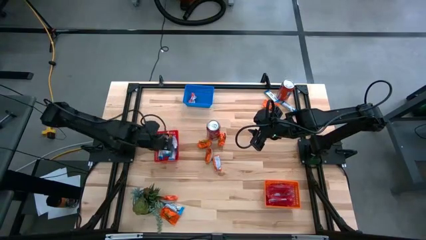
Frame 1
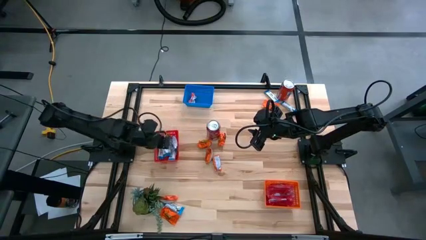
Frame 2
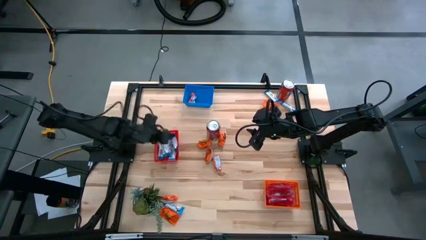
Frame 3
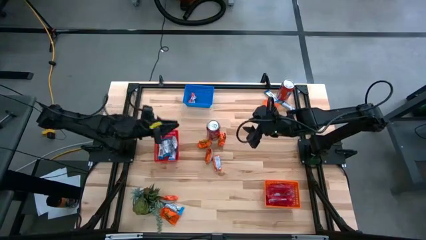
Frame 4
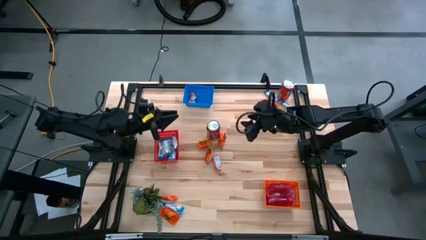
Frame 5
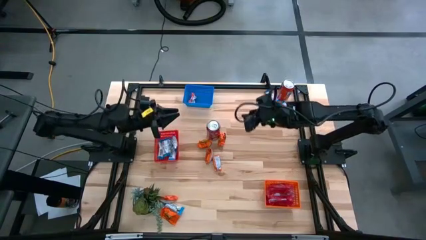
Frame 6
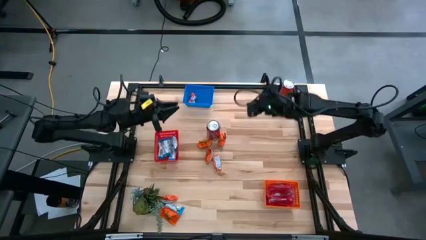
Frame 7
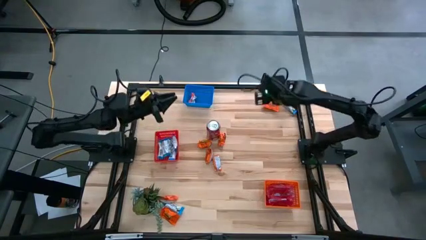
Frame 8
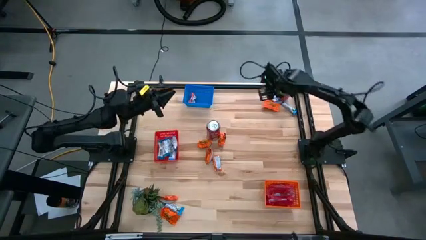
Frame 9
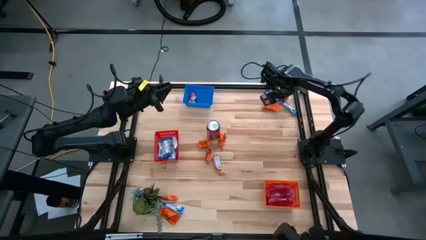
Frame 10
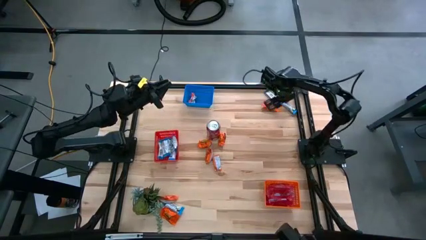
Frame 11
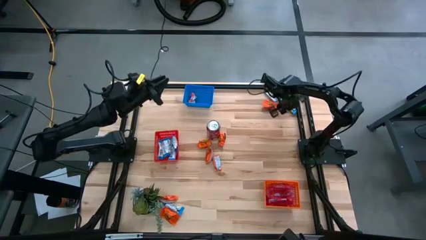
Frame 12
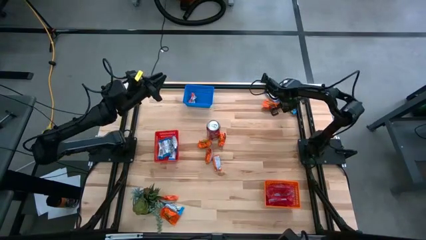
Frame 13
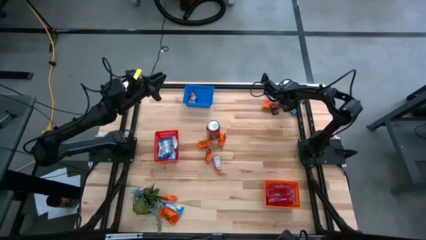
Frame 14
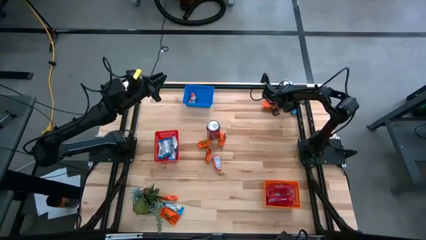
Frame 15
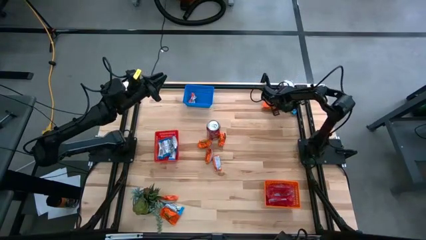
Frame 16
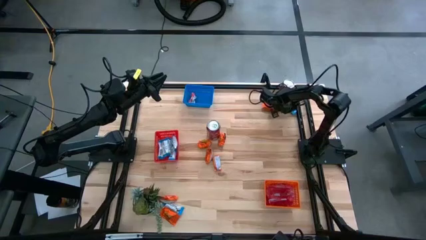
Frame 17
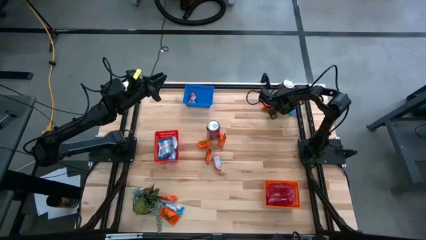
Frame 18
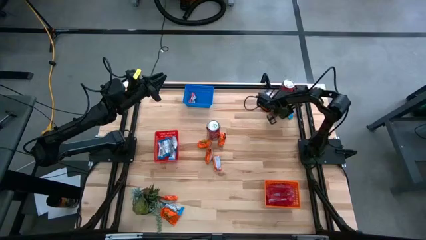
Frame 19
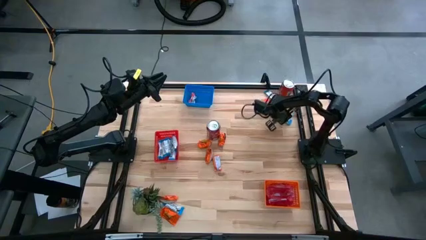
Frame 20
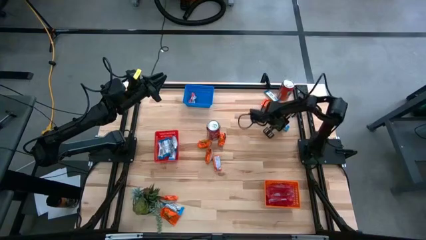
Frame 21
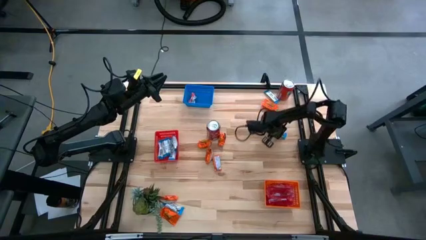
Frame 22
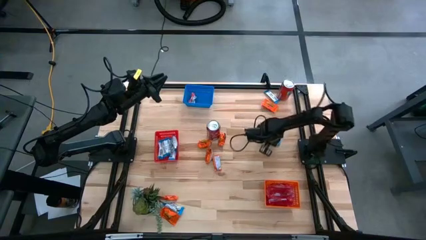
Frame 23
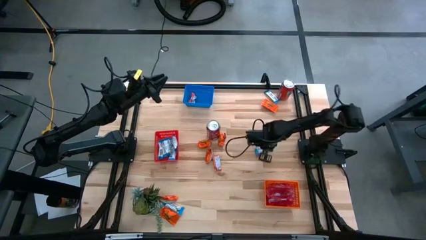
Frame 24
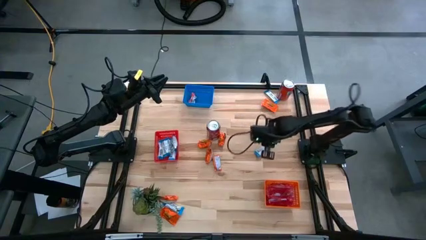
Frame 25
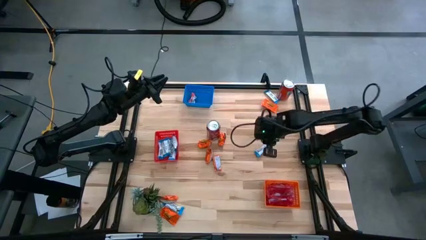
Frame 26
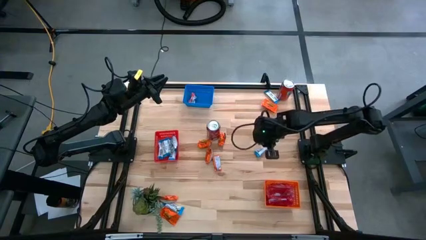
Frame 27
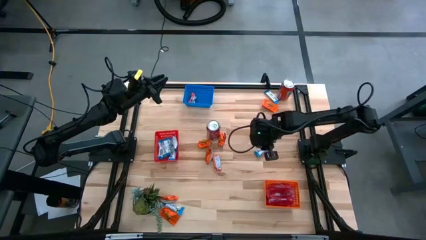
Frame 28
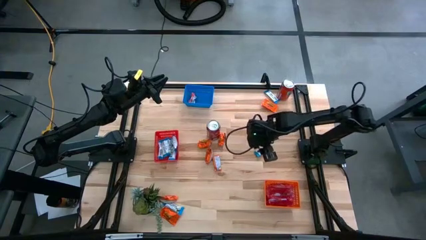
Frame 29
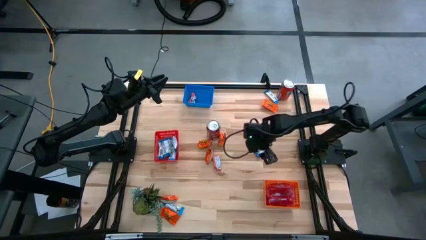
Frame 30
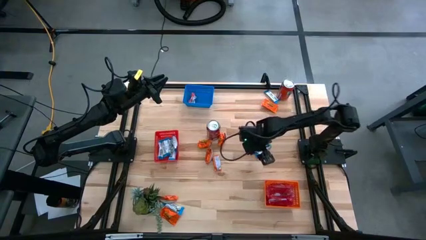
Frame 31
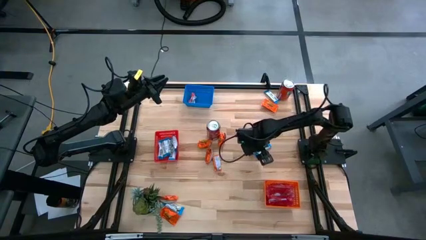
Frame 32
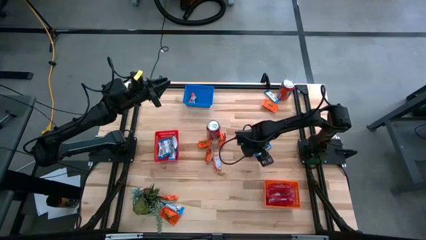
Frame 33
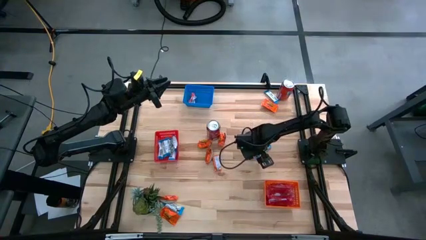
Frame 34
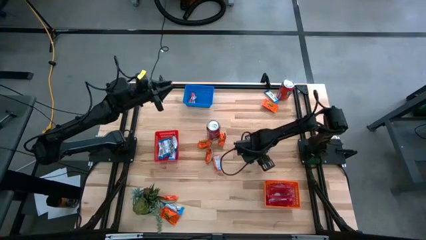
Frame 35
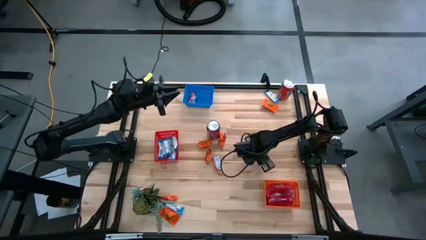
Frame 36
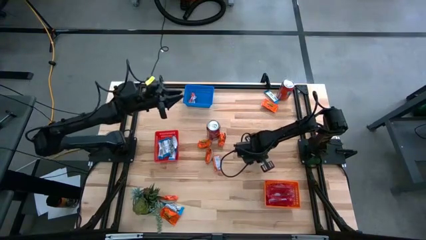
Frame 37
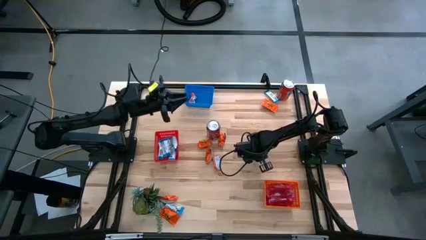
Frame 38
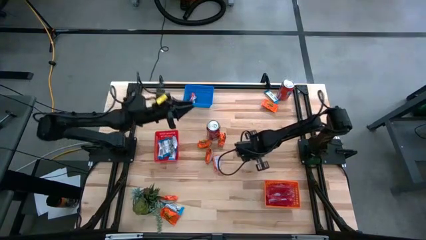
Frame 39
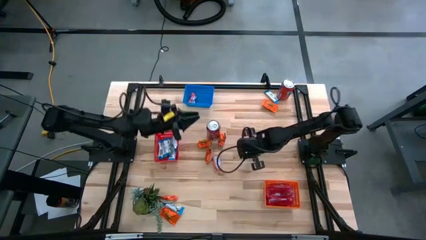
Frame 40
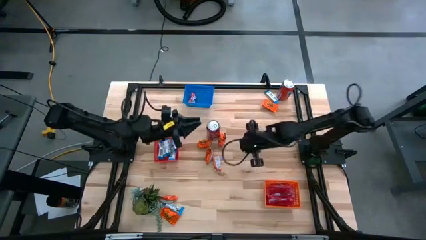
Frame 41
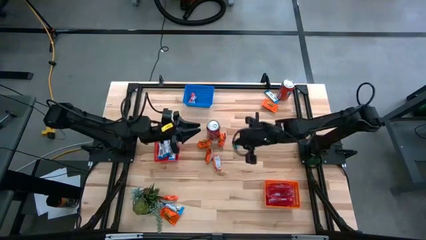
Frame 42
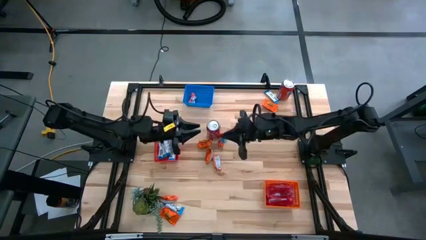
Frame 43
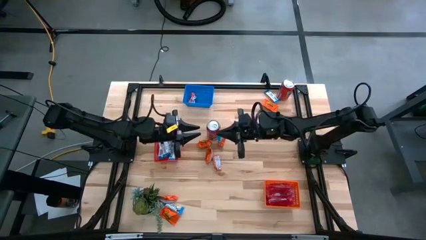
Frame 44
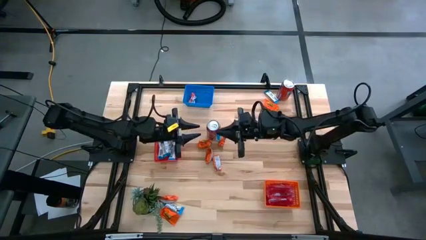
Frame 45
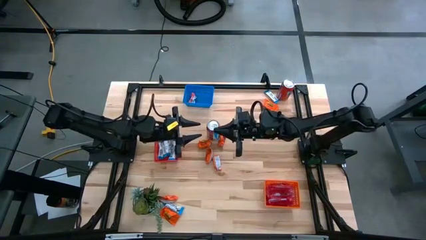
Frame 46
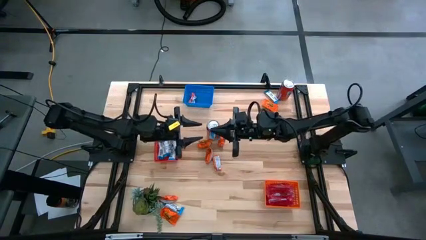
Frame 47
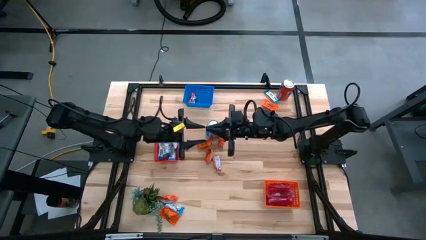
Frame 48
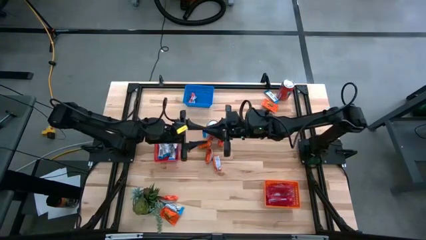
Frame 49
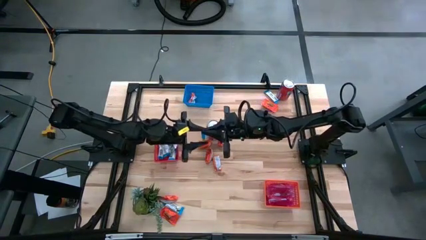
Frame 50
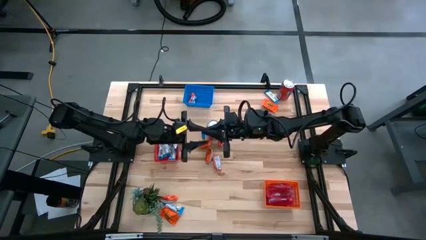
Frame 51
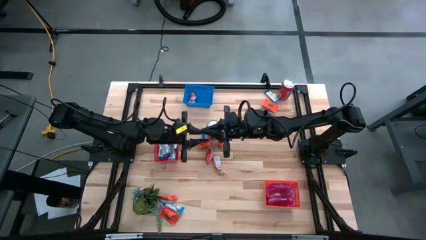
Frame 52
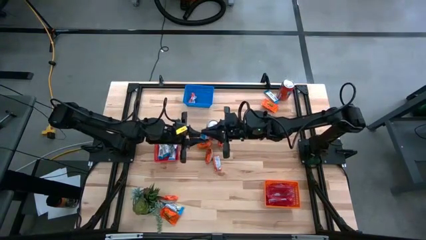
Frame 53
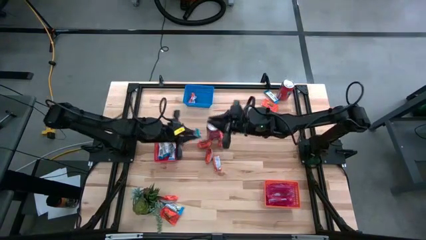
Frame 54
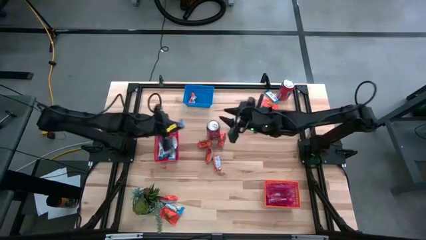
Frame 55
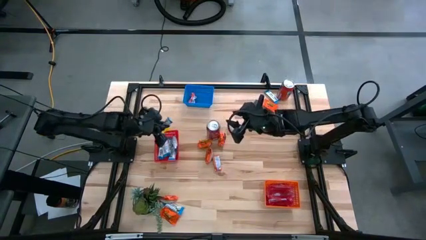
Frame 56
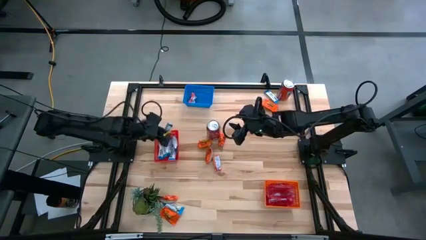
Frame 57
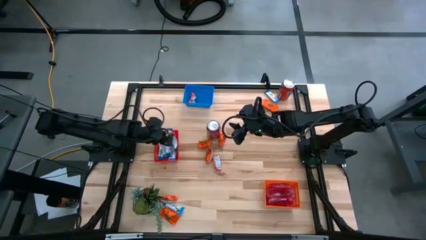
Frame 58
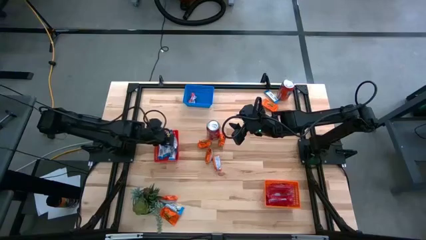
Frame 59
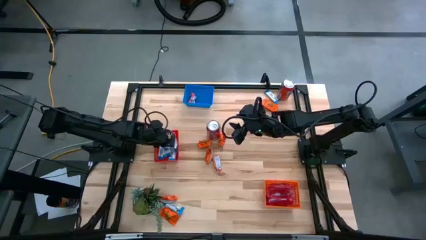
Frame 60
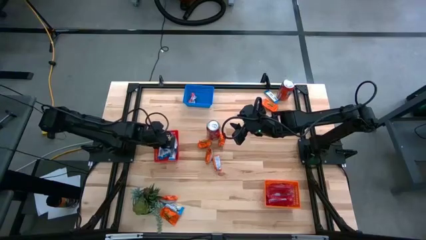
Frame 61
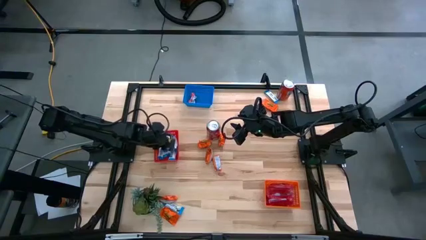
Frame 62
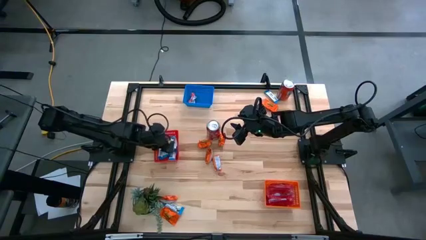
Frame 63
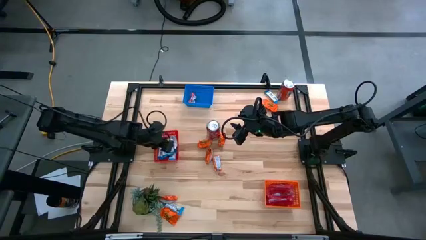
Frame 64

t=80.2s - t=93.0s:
Task: Sort candy
Put the white chocolate into the red bin
